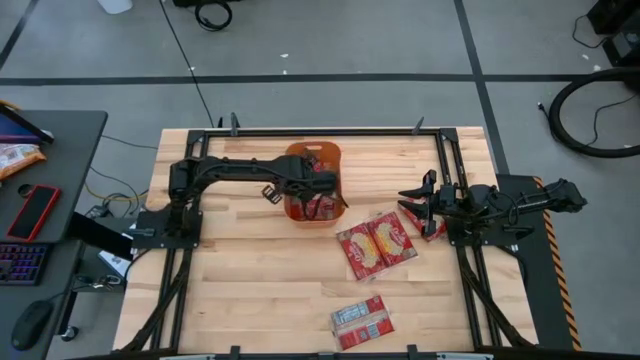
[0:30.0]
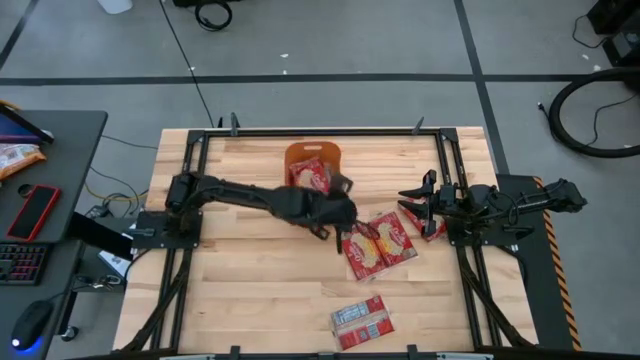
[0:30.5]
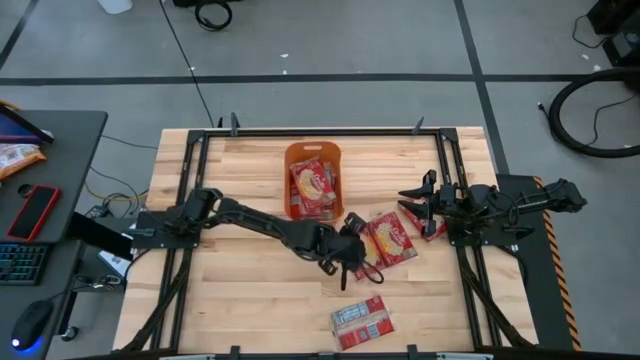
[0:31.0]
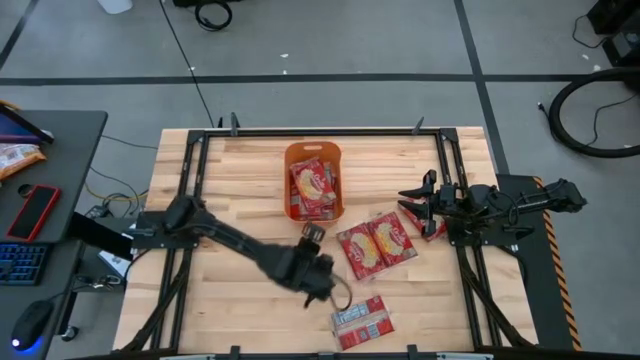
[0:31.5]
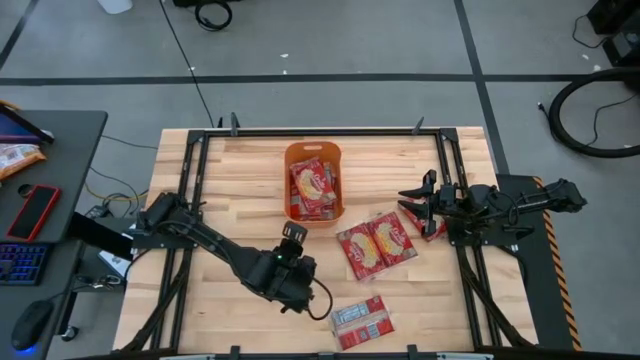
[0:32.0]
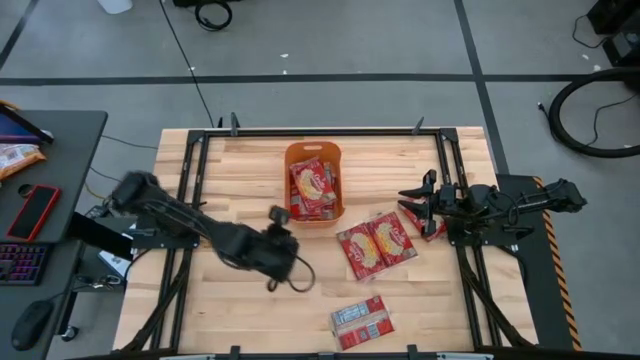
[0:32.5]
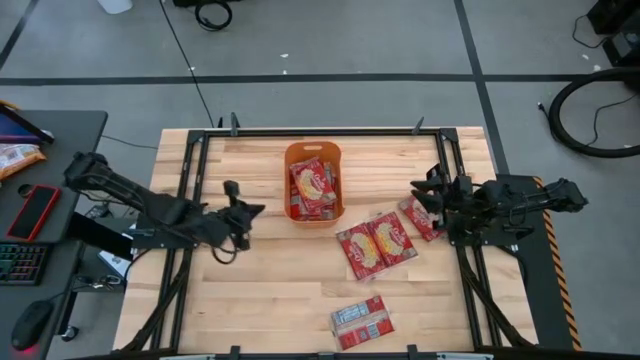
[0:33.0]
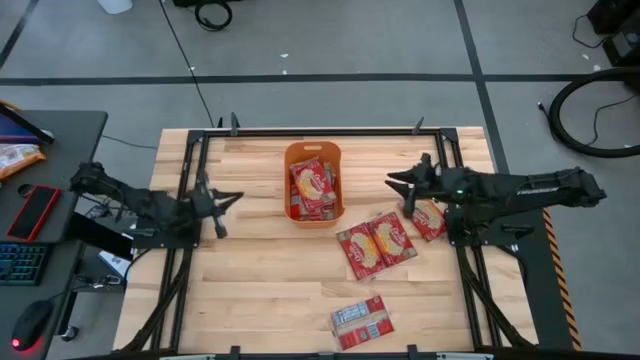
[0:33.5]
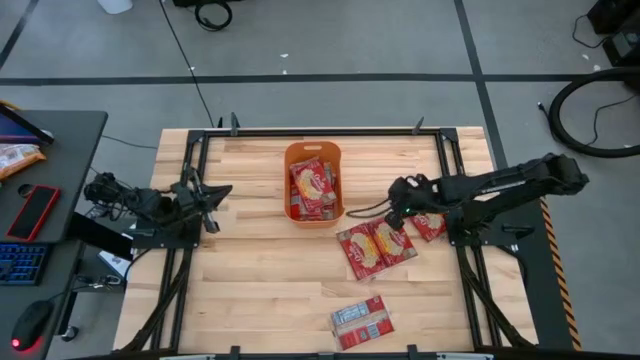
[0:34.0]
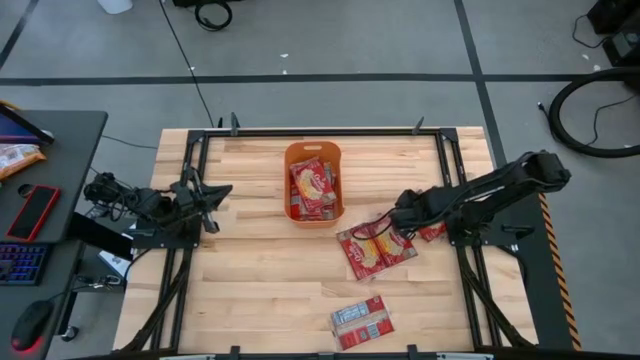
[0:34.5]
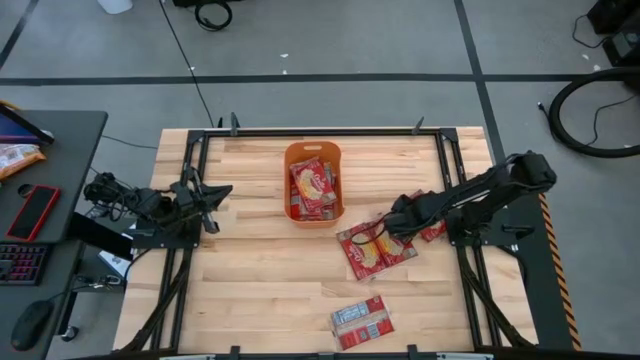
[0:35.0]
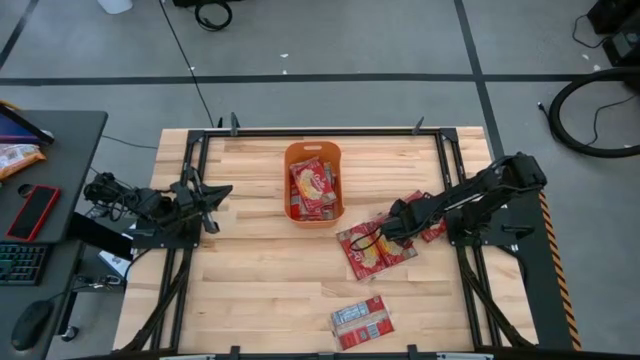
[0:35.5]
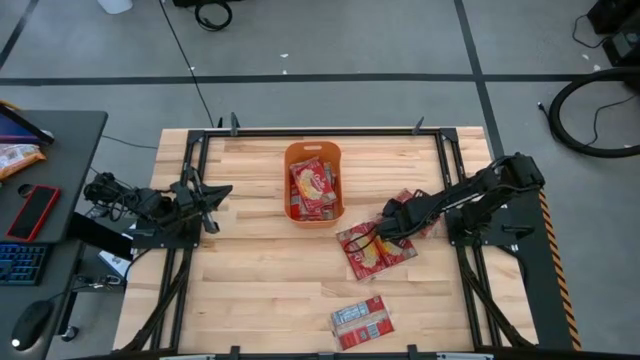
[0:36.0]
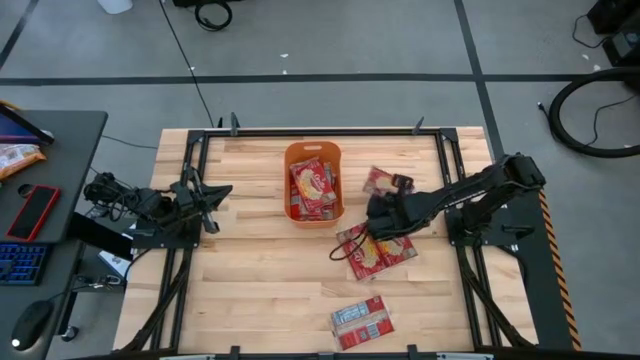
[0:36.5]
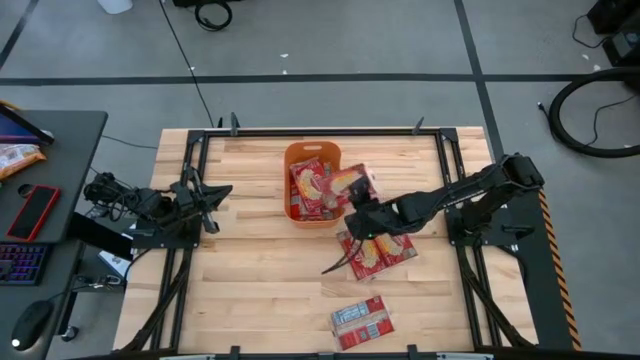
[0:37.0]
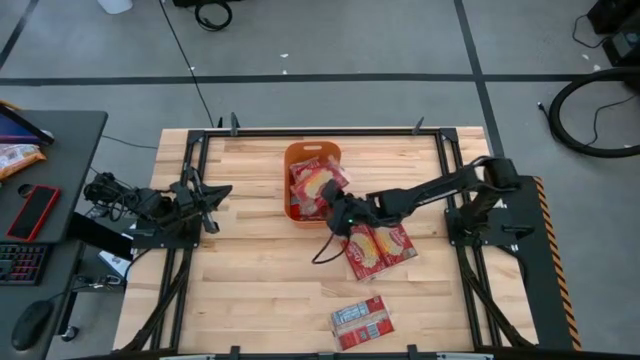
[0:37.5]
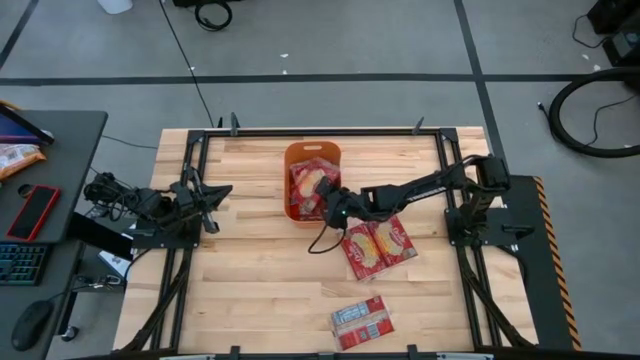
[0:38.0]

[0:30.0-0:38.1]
Task: Sort popcorn bags into baskets
Put the popcorn bag into the orange bin

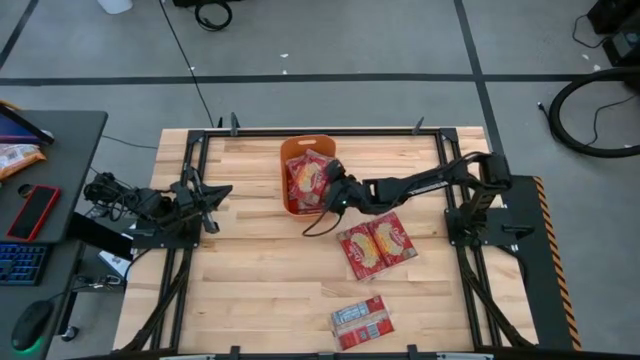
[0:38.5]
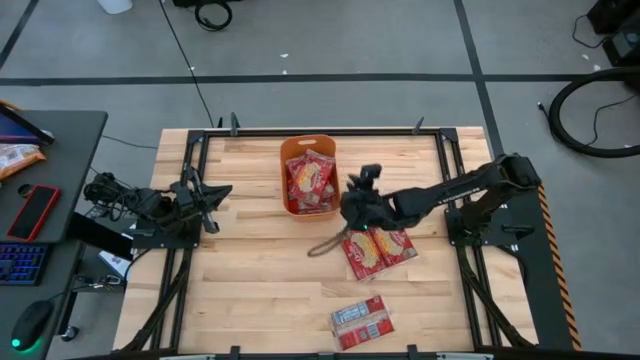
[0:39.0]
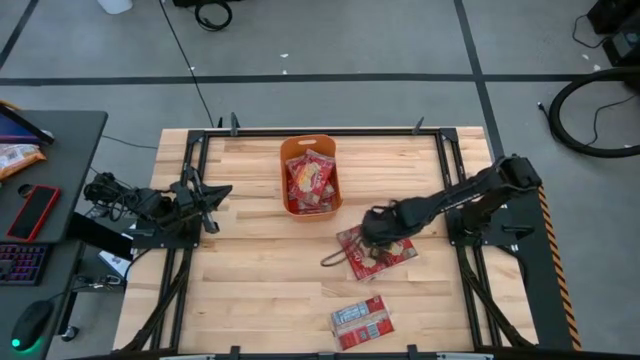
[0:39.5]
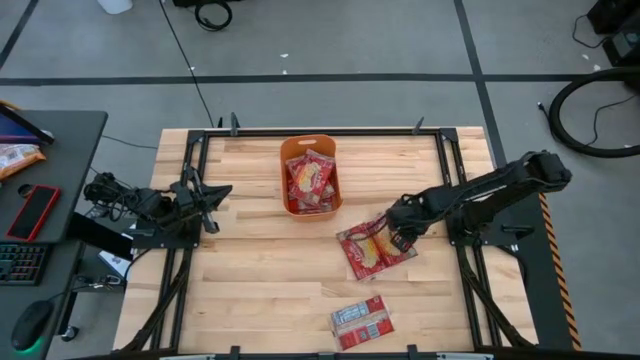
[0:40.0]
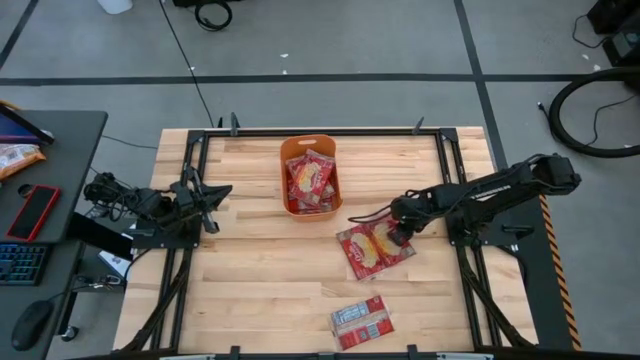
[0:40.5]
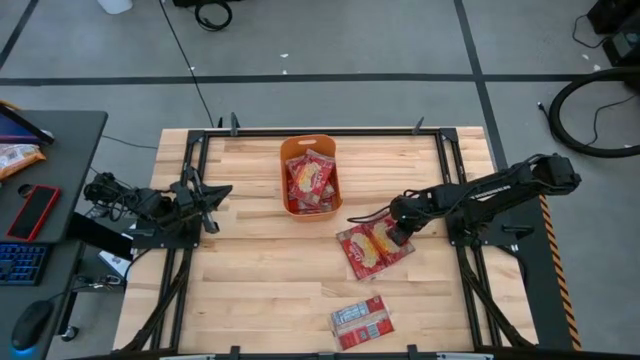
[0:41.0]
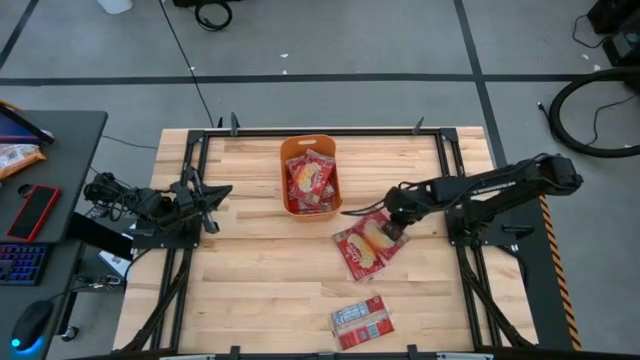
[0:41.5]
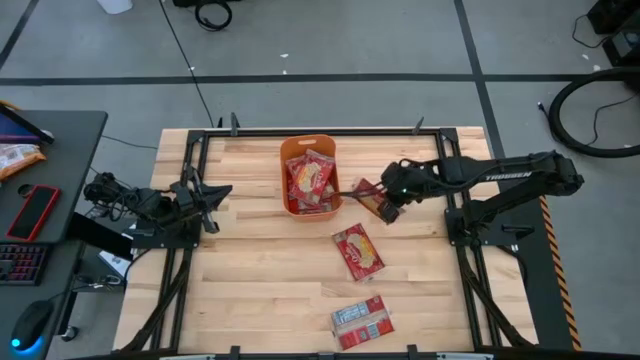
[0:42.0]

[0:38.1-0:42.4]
Put the popcorn bag into the orange bin

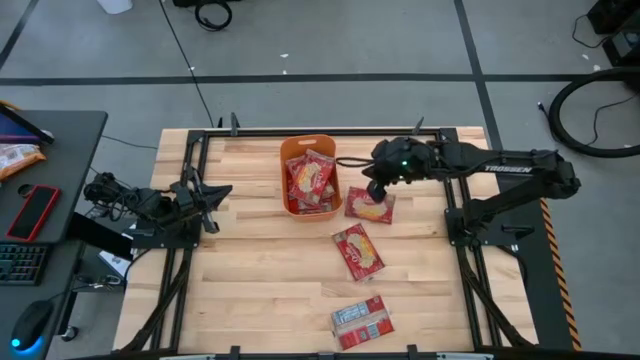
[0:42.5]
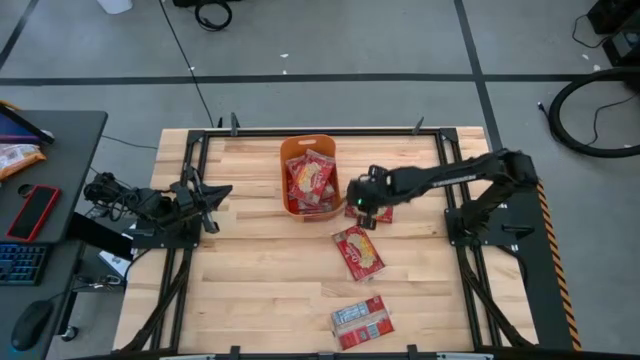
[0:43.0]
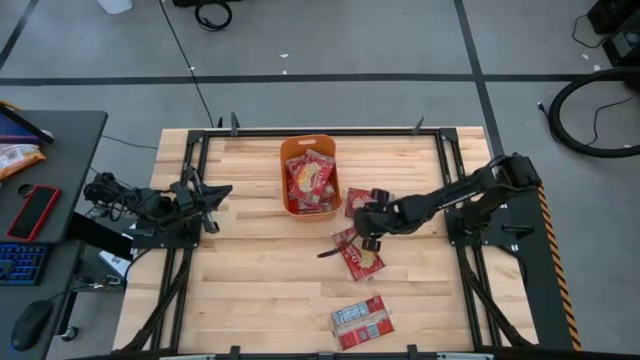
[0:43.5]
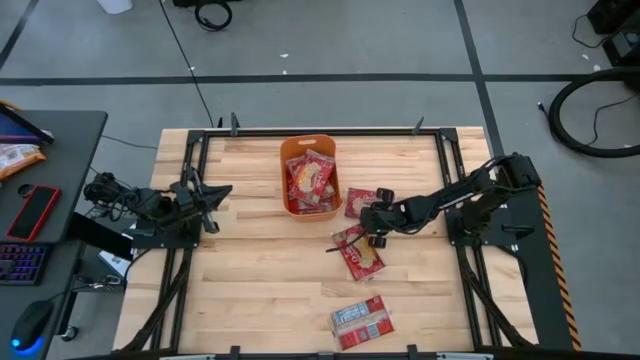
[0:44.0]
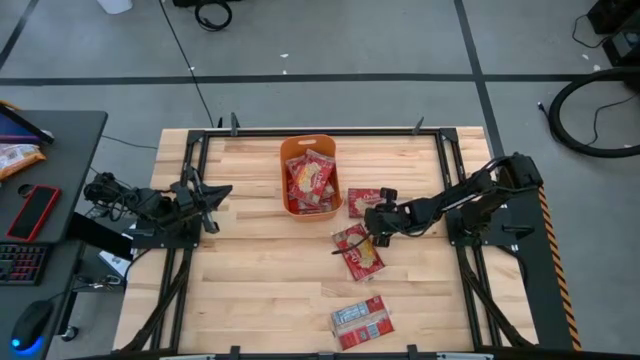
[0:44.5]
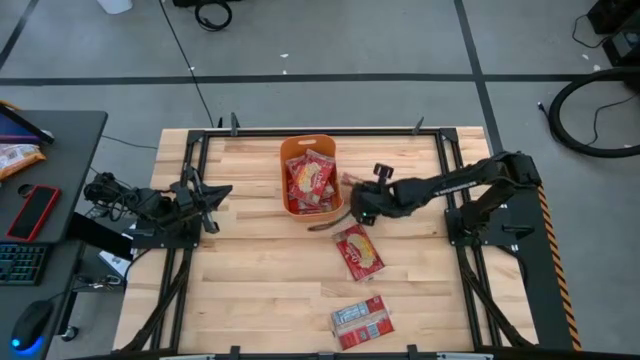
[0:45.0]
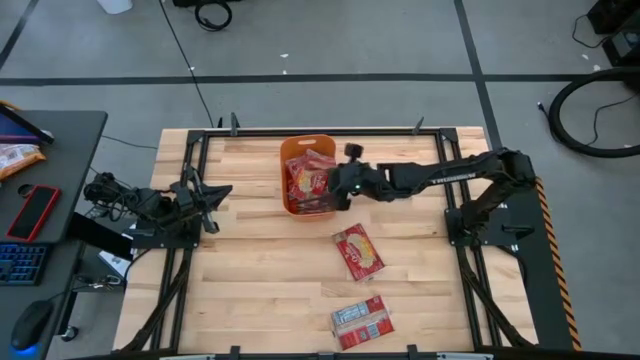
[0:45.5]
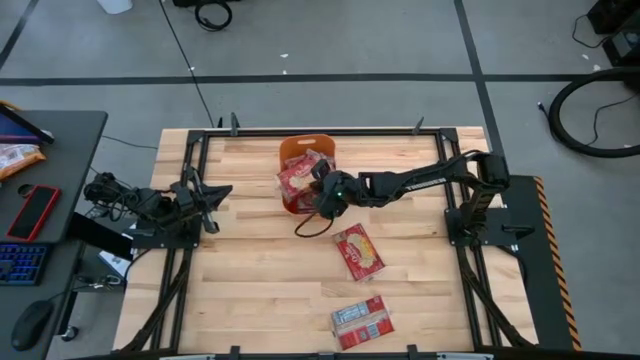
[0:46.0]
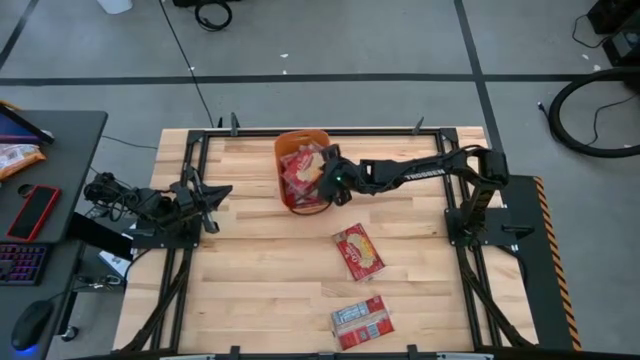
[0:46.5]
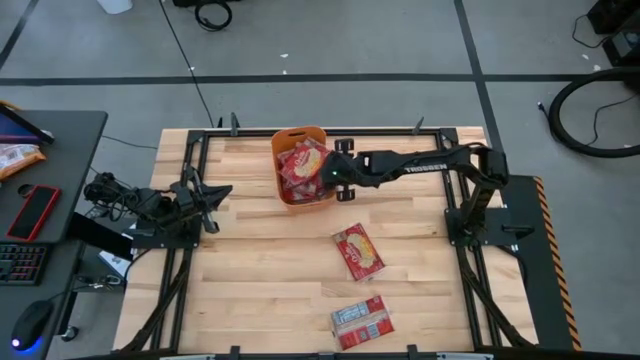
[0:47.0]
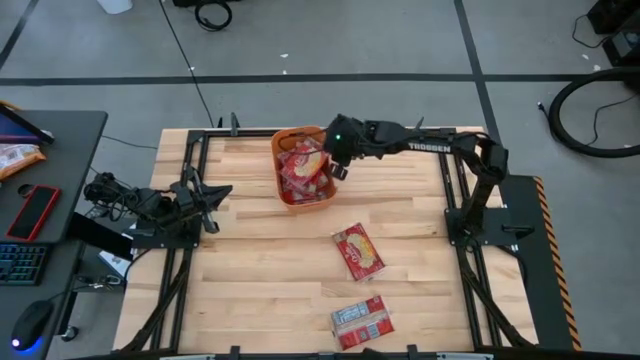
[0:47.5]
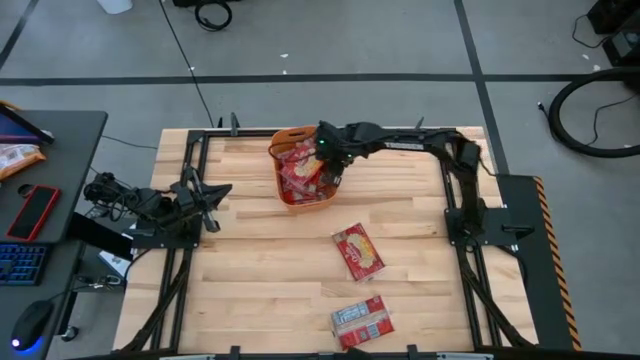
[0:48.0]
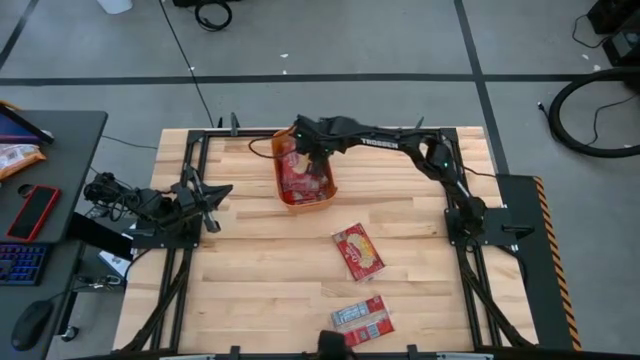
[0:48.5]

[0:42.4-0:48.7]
Put the top popcorn bag into the orange bin

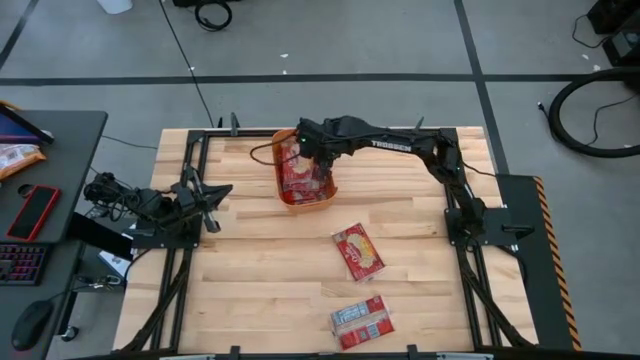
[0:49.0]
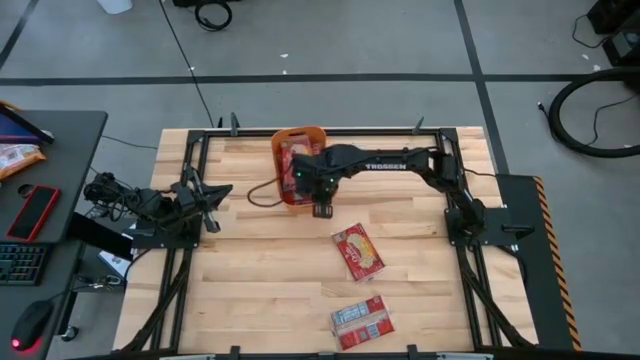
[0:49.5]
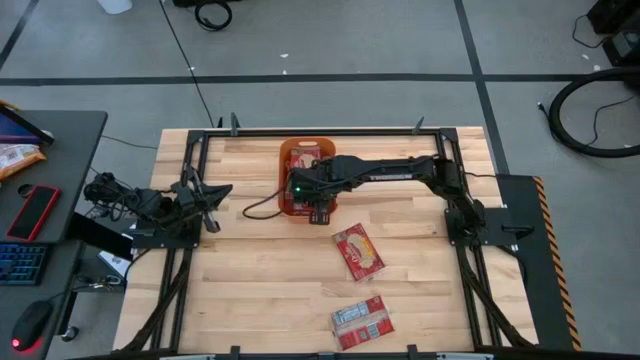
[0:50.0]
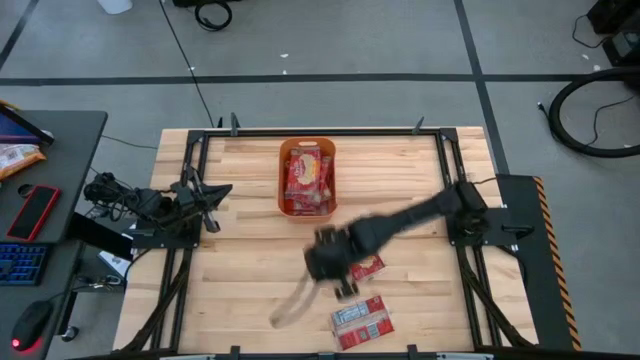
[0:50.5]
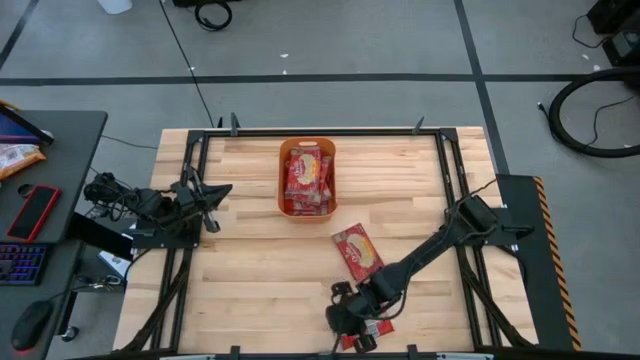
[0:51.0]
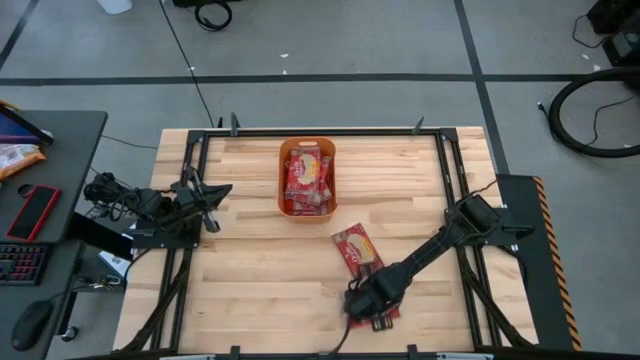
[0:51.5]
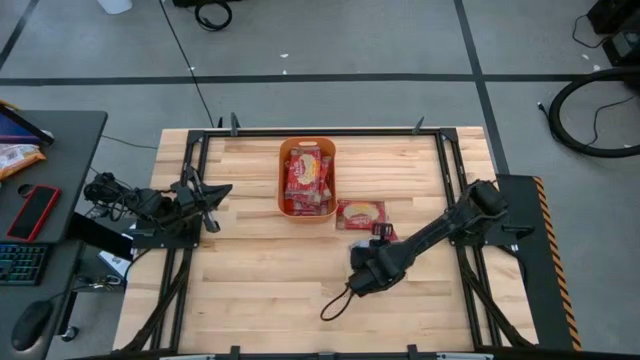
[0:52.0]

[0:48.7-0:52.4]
Move the bottom popcorn bag to the center of the table
